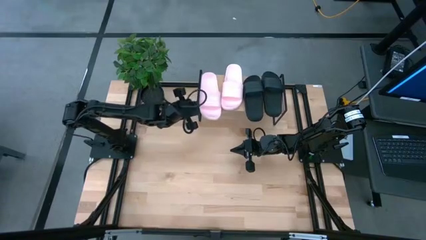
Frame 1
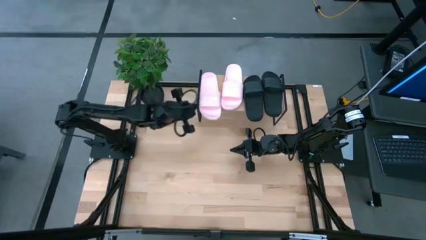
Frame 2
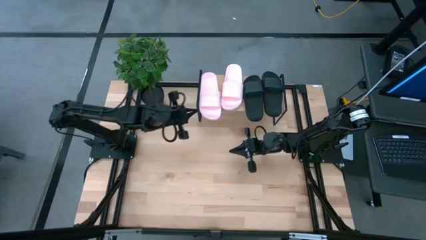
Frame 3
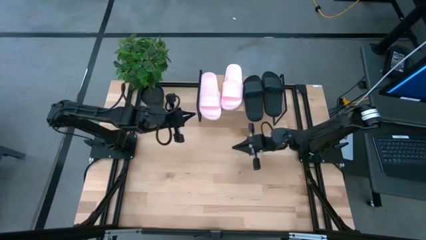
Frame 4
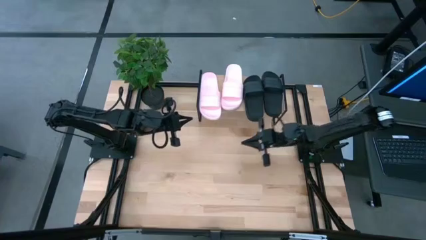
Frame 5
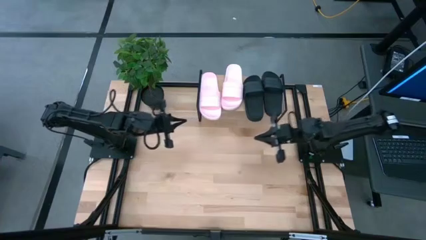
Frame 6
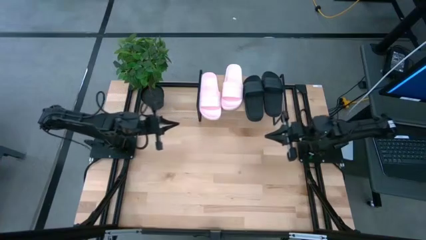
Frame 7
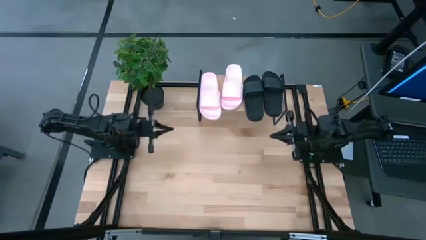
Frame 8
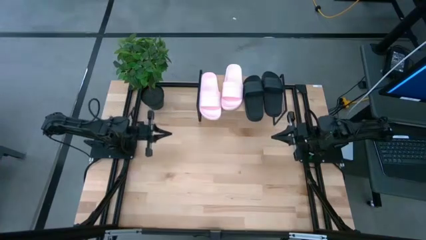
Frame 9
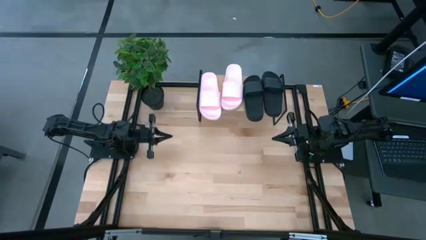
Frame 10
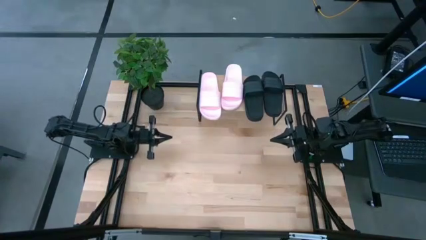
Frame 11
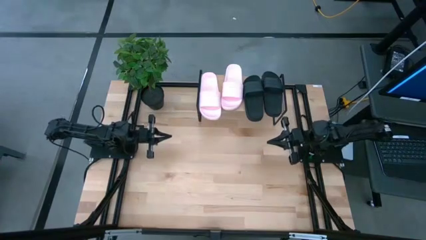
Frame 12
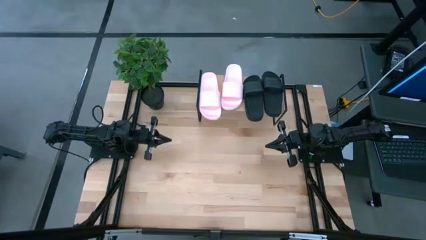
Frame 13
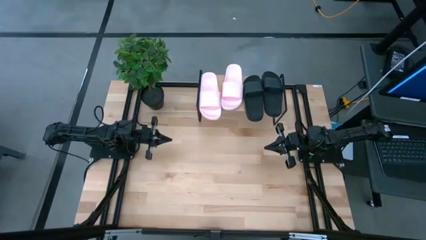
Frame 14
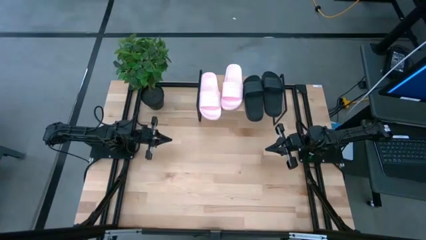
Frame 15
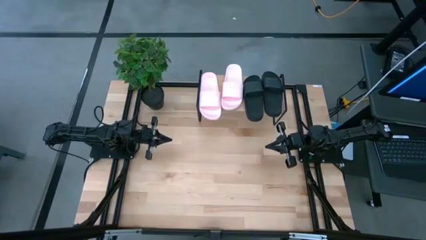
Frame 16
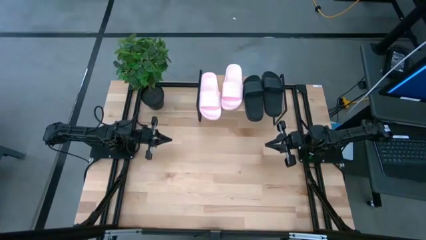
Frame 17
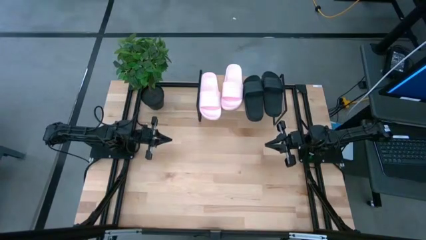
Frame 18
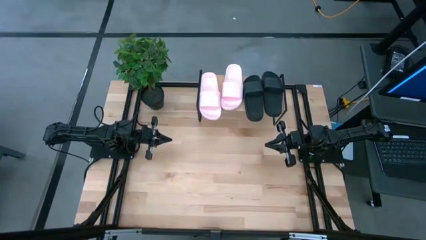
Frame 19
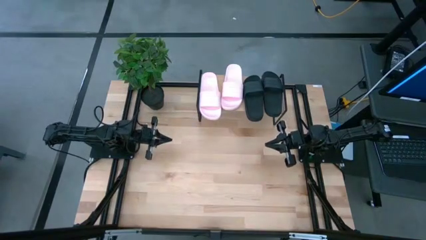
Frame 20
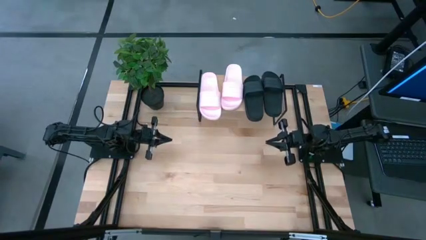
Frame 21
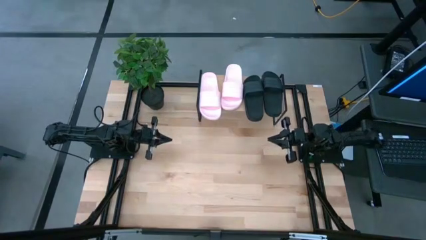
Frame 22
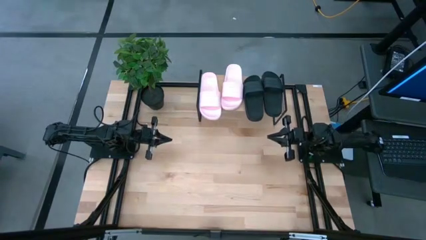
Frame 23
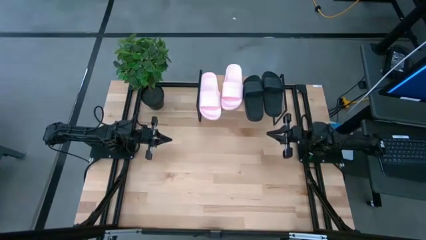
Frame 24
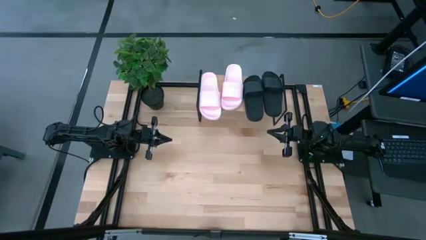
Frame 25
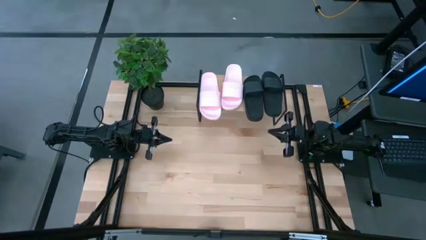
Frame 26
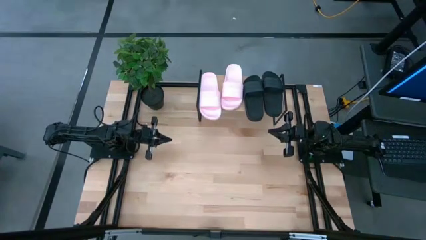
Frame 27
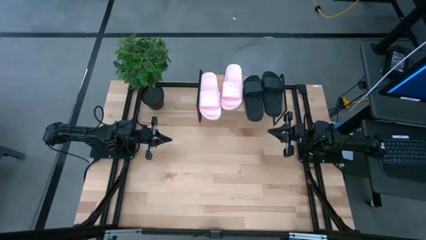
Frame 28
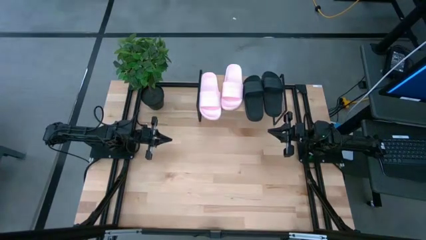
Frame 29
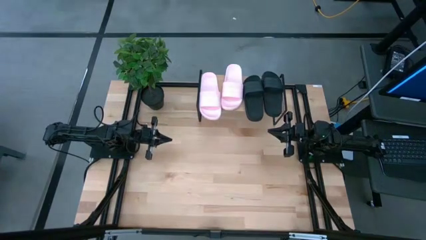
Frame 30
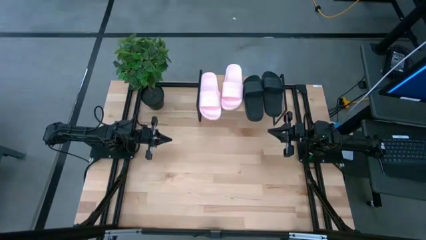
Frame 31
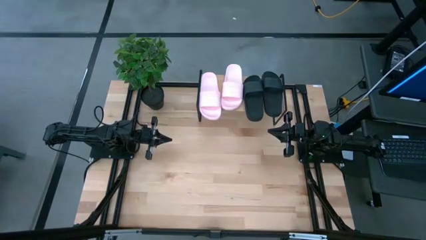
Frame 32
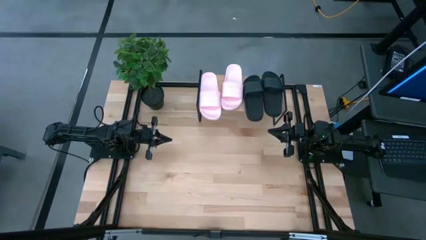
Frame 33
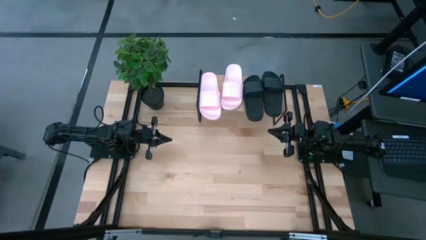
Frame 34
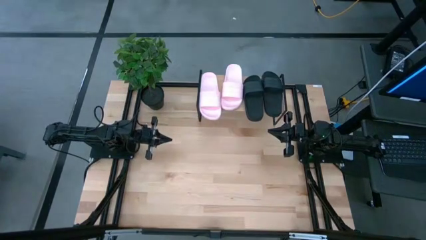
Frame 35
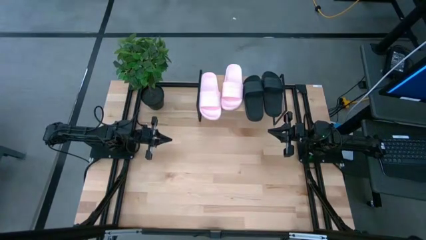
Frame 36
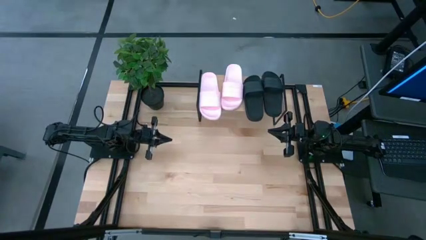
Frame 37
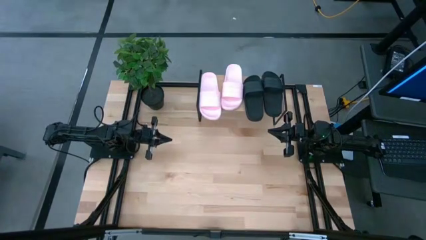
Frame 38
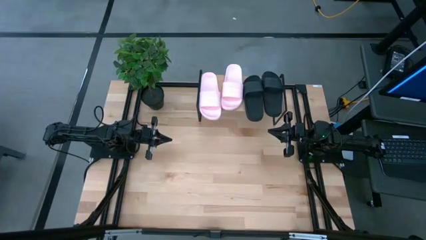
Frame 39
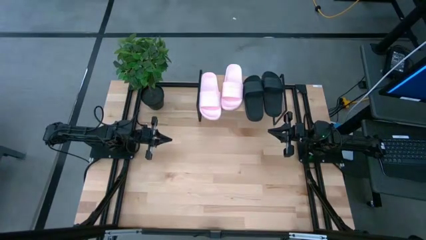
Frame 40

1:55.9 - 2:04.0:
Task: Pick and place slides into the shelf
Return to Home Position

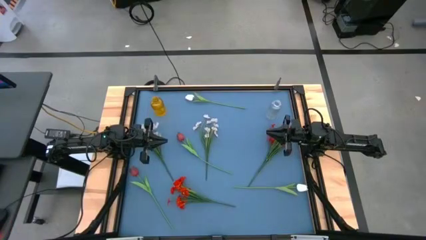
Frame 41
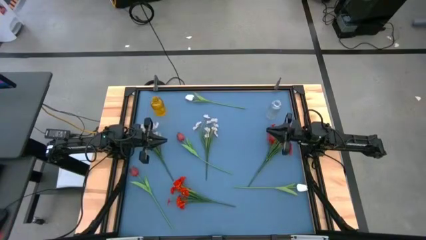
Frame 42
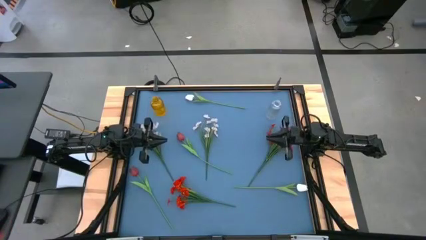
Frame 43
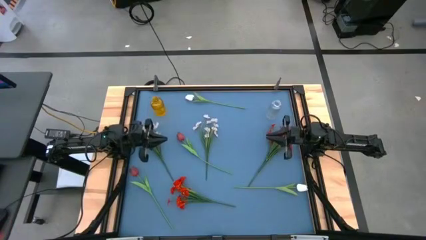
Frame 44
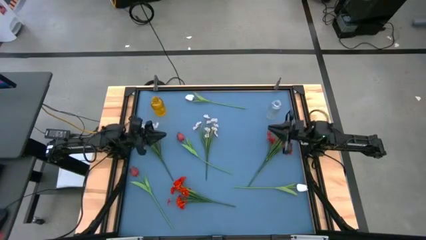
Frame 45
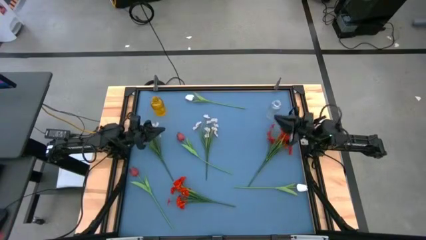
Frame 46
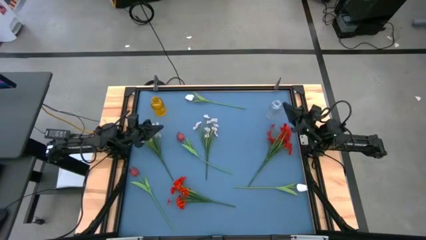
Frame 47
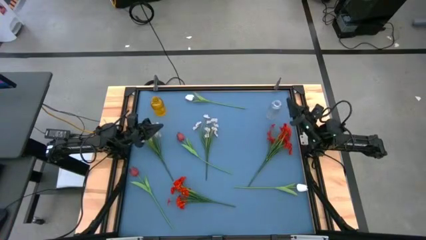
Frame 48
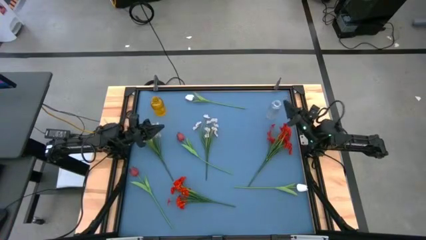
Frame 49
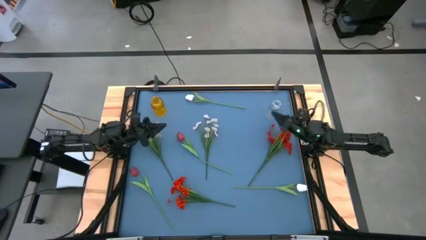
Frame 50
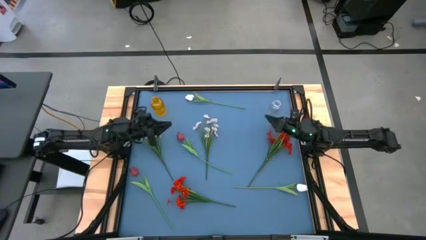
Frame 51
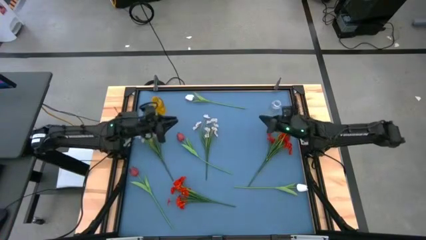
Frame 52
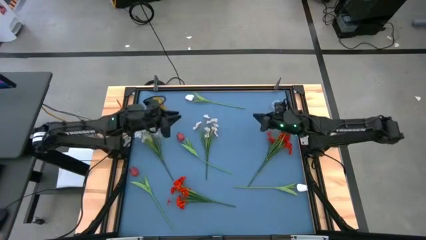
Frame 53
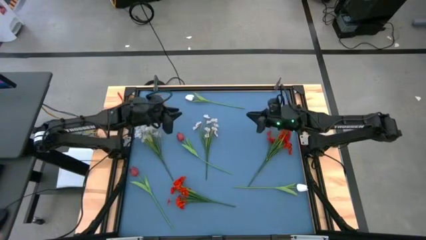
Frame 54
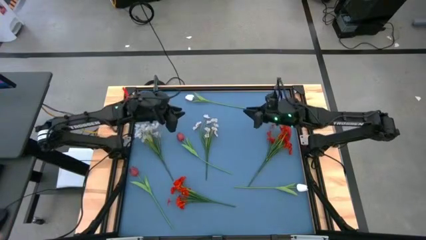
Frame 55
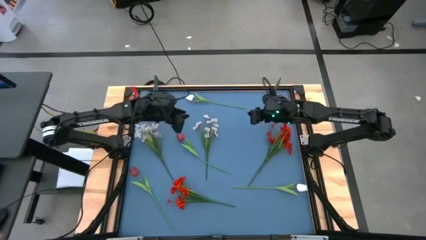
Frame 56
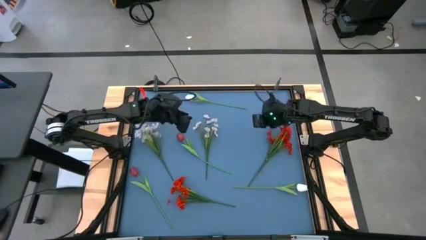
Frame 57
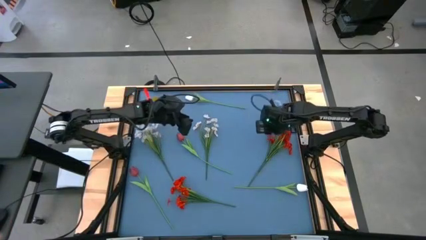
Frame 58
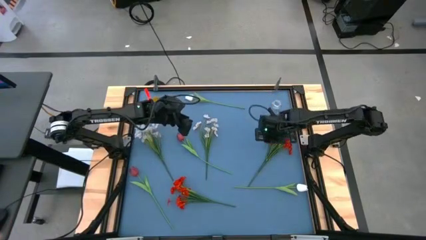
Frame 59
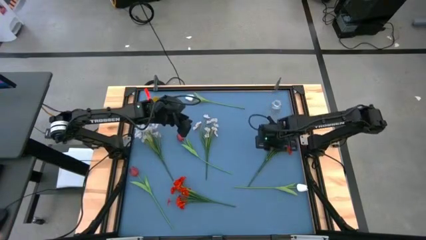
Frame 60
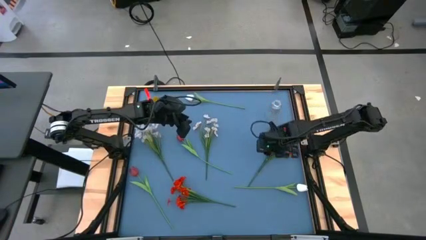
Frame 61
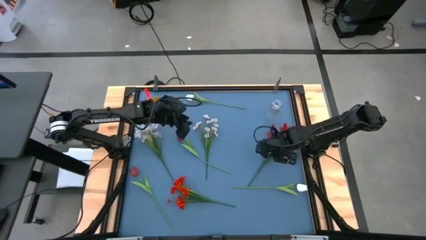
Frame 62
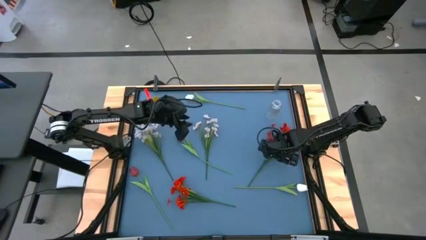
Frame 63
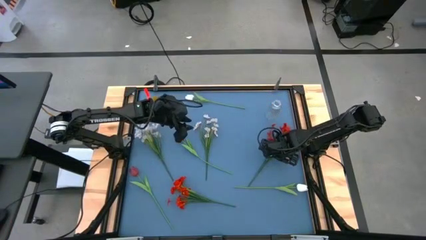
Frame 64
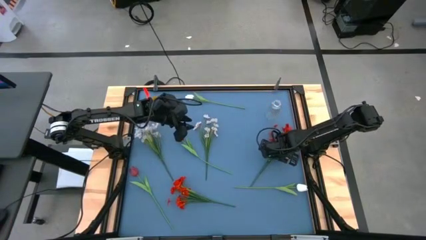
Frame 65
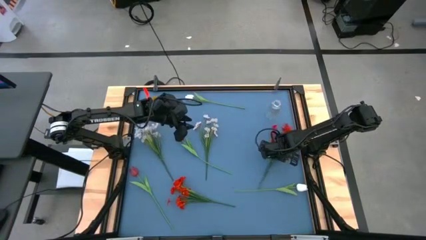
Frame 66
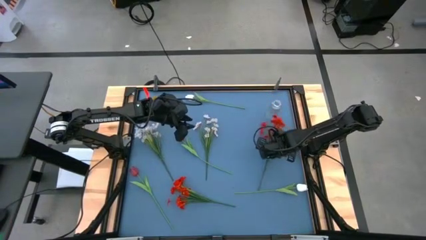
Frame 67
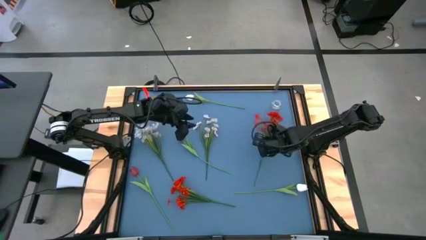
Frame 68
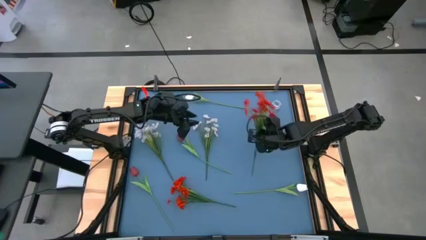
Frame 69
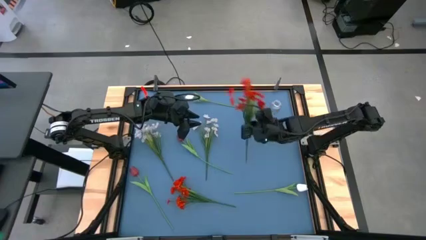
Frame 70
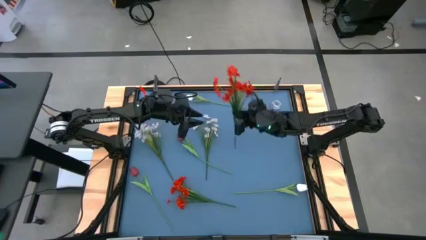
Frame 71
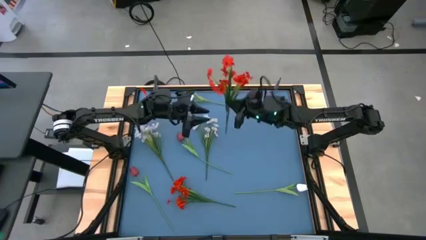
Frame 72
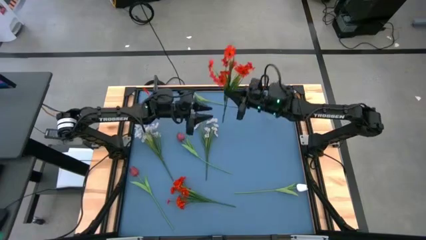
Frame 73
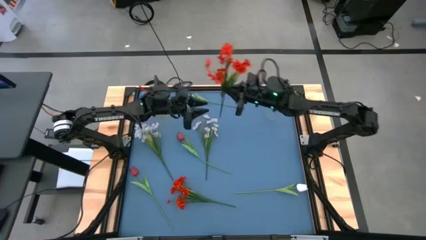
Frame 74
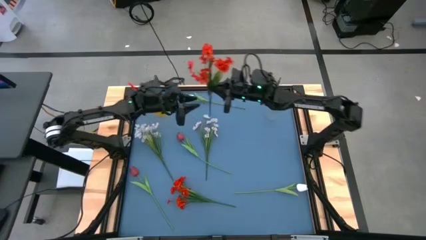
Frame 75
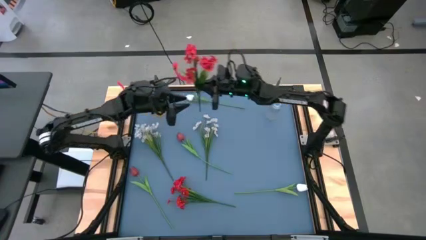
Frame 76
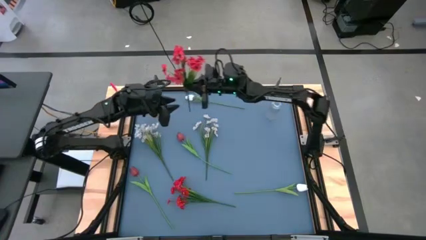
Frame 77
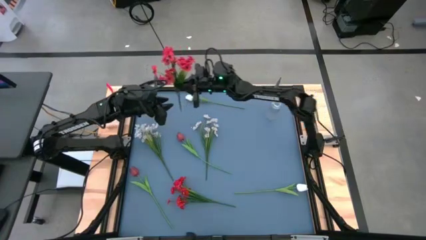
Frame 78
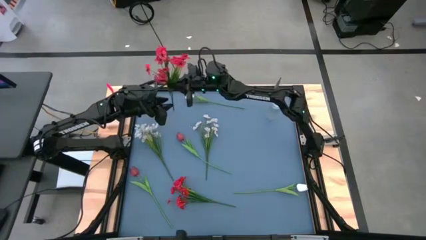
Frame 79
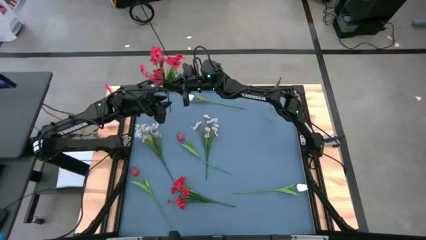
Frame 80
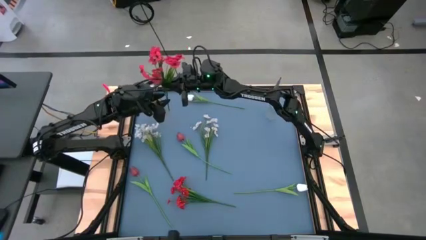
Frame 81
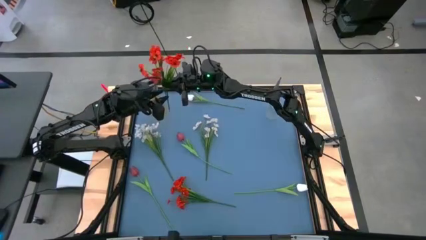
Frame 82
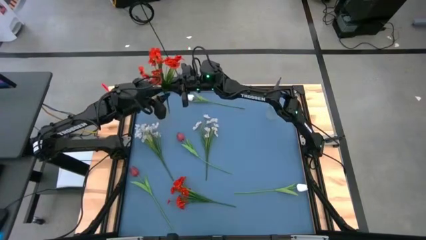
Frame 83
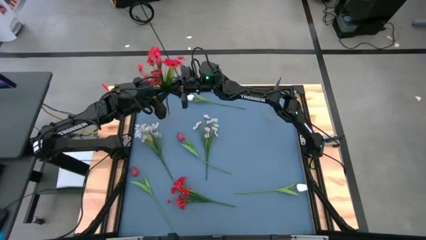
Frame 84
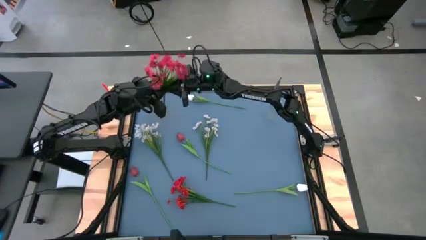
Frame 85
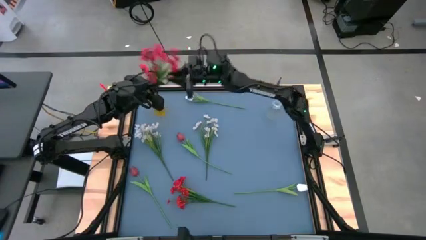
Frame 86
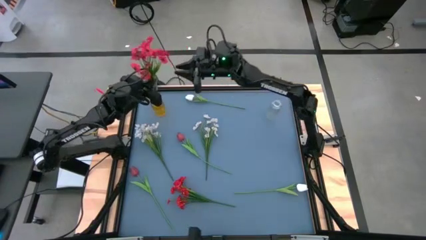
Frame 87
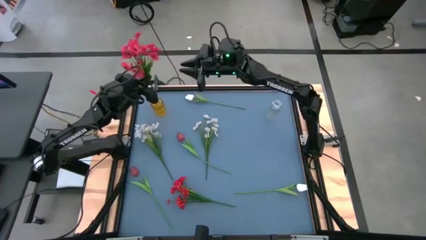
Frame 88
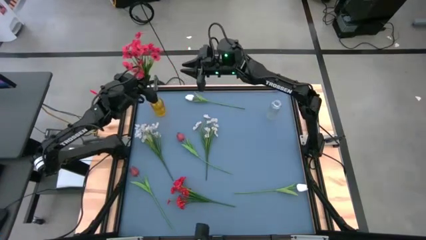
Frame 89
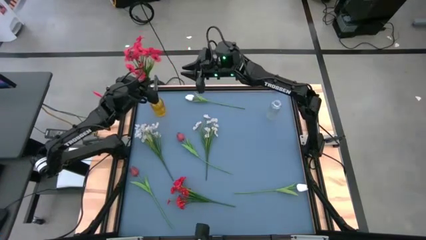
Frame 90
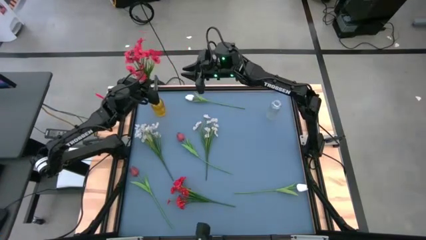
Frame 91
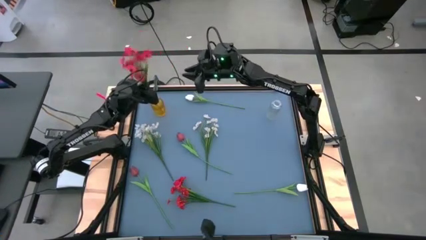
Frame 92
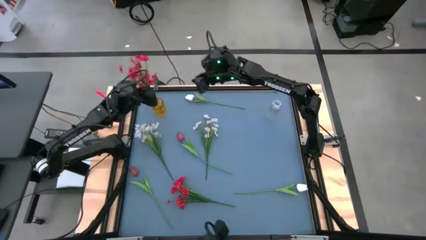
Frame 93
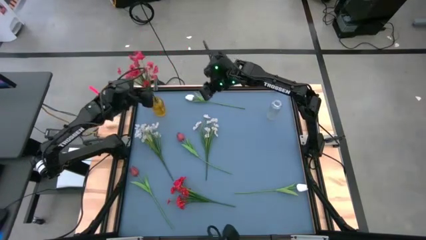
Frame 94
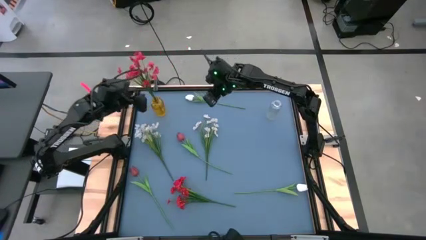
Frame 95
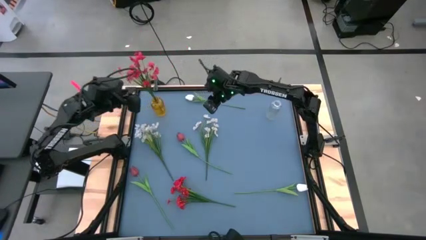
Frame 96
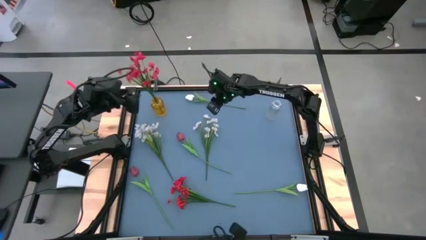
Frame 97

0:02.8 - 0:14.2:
Task: Sort flowers into vase by color
Put the right red flowers into the yellow transparent flower vase
